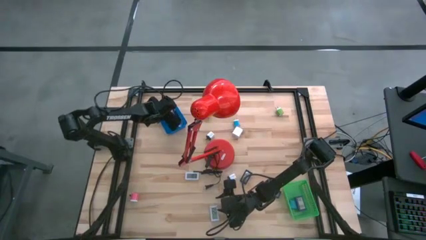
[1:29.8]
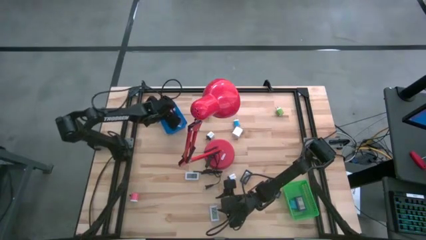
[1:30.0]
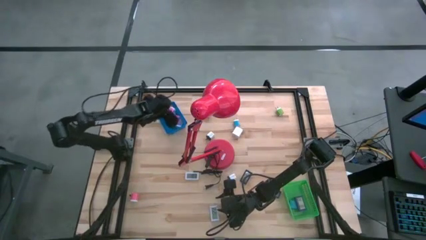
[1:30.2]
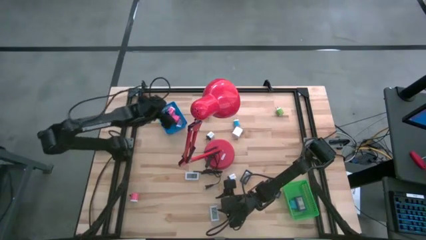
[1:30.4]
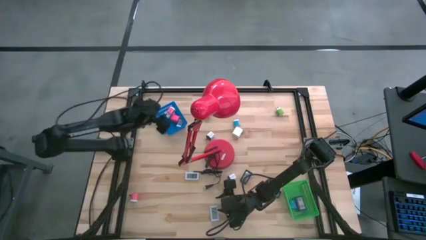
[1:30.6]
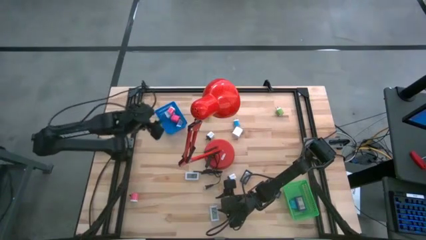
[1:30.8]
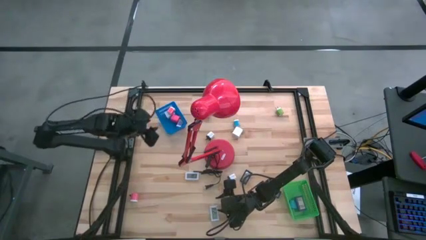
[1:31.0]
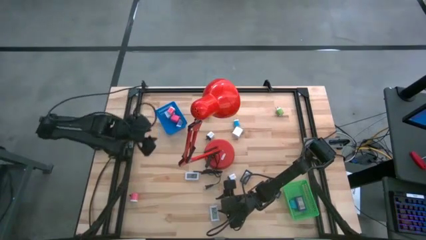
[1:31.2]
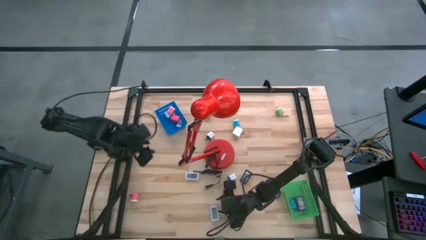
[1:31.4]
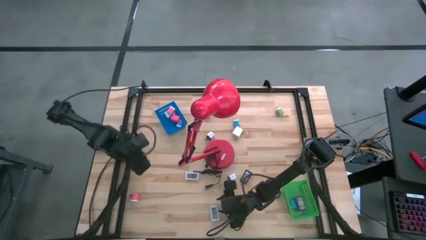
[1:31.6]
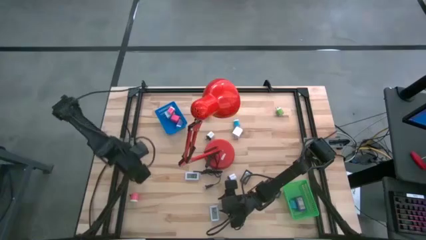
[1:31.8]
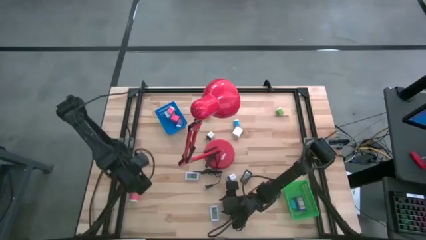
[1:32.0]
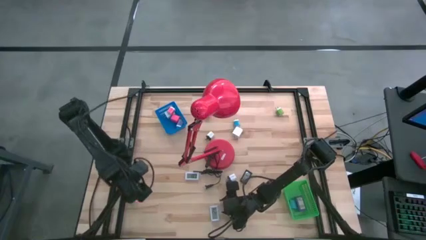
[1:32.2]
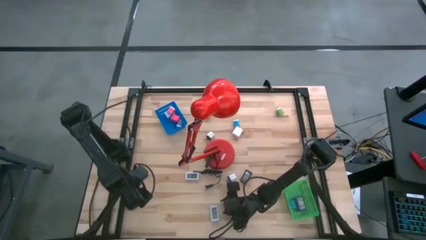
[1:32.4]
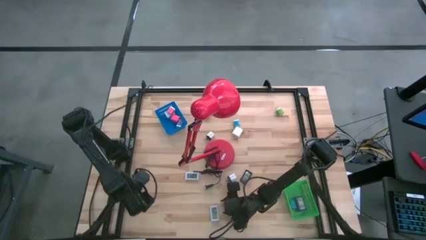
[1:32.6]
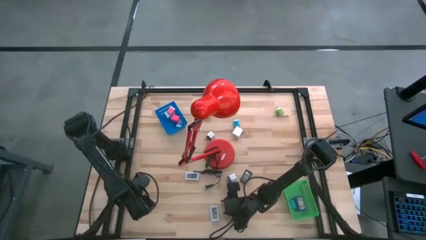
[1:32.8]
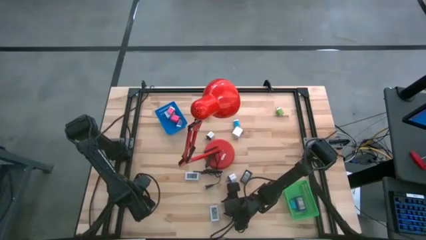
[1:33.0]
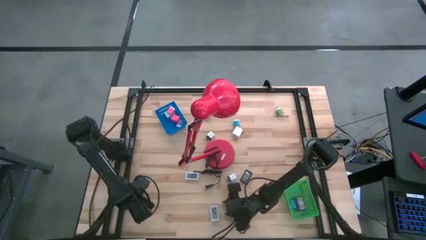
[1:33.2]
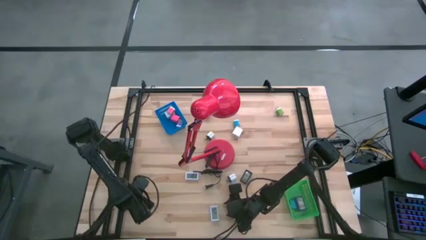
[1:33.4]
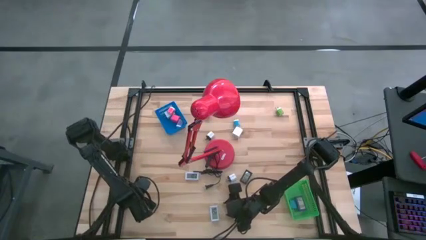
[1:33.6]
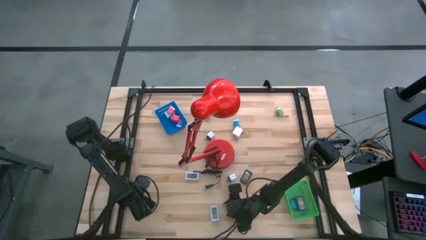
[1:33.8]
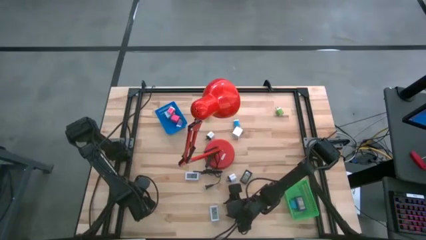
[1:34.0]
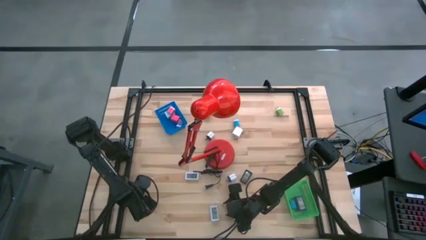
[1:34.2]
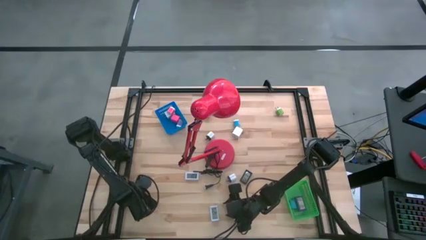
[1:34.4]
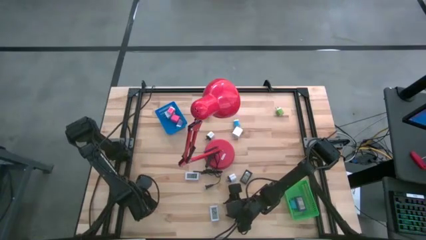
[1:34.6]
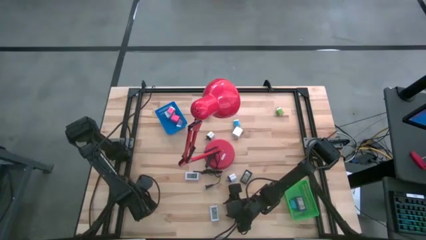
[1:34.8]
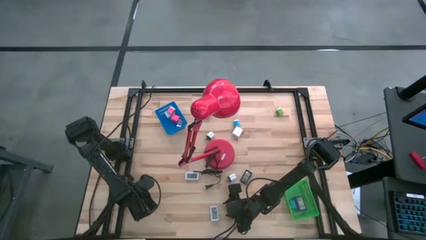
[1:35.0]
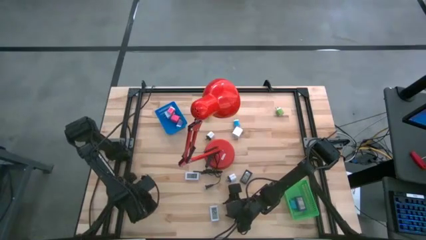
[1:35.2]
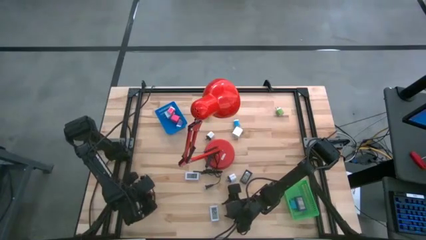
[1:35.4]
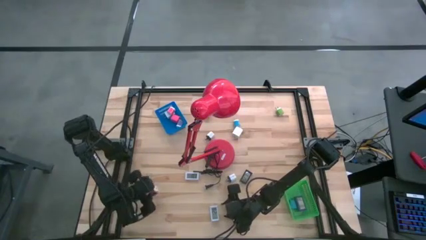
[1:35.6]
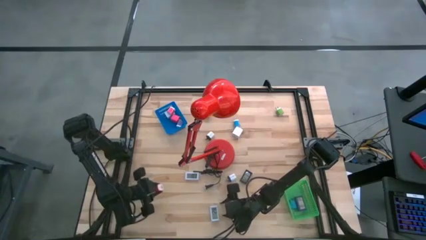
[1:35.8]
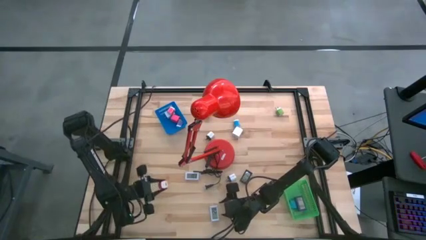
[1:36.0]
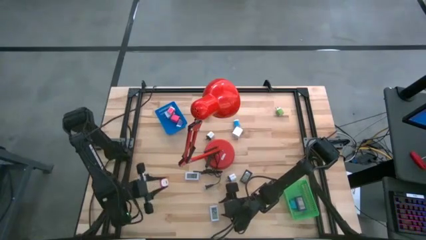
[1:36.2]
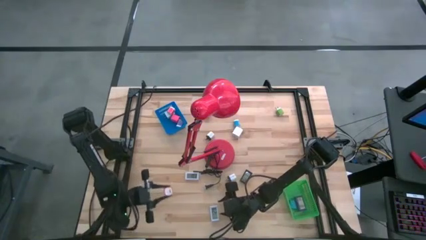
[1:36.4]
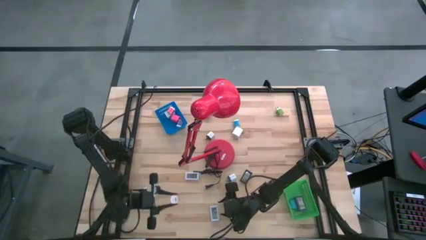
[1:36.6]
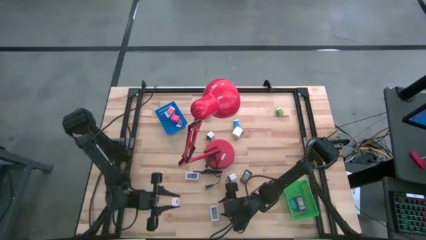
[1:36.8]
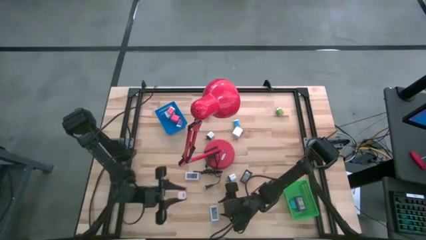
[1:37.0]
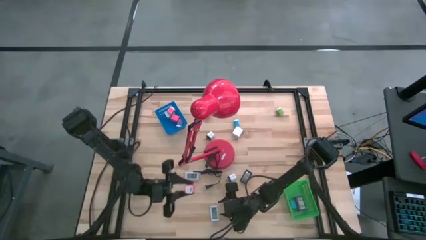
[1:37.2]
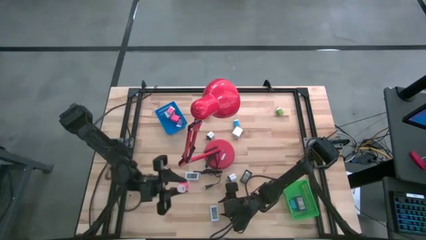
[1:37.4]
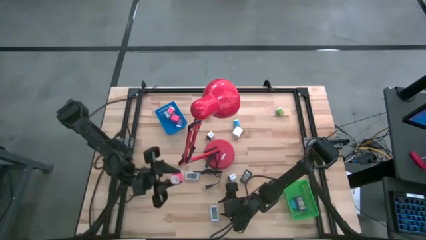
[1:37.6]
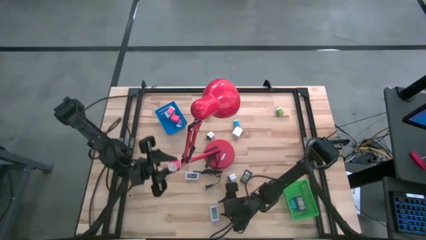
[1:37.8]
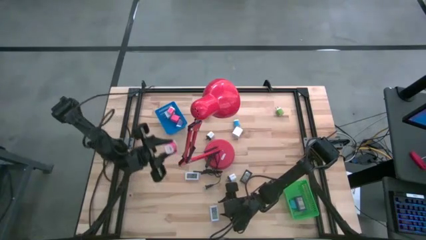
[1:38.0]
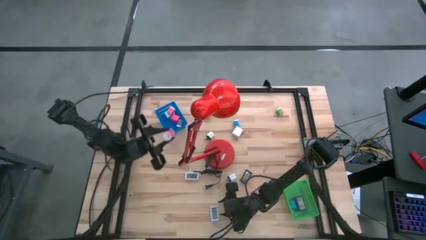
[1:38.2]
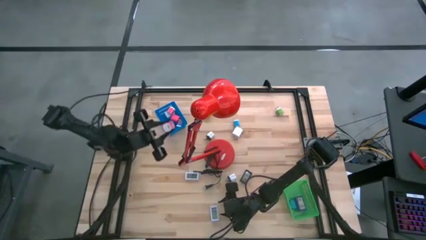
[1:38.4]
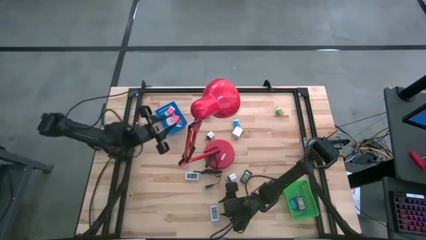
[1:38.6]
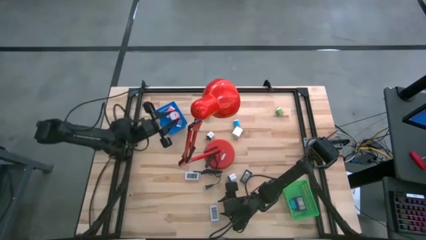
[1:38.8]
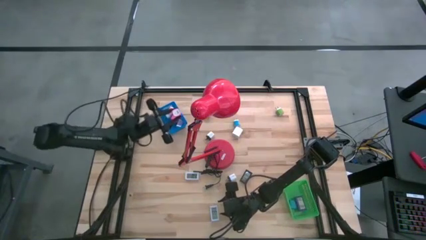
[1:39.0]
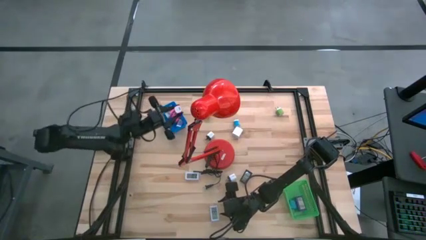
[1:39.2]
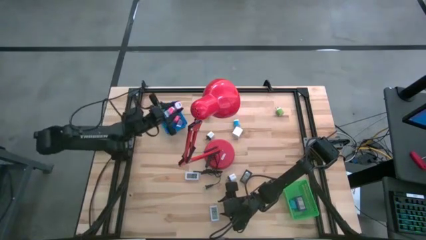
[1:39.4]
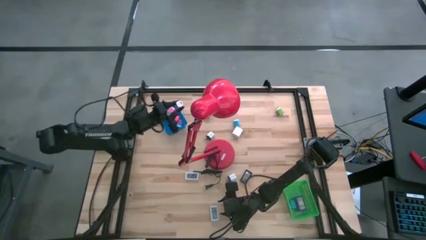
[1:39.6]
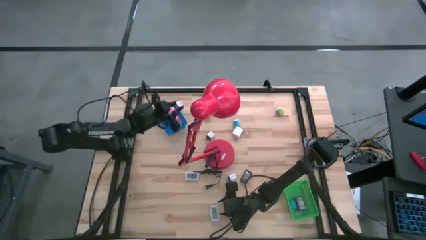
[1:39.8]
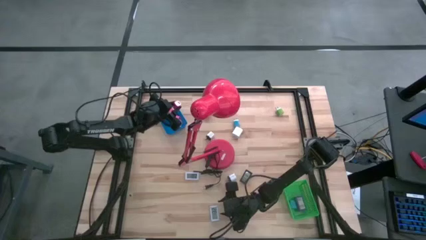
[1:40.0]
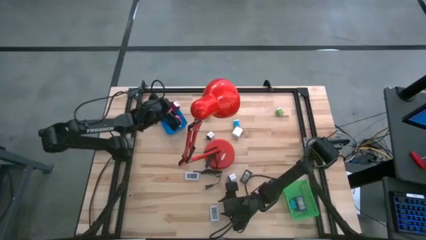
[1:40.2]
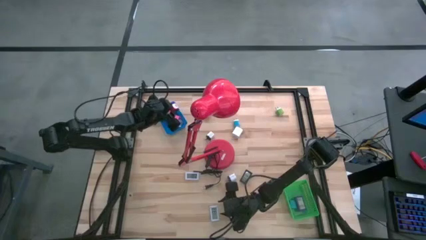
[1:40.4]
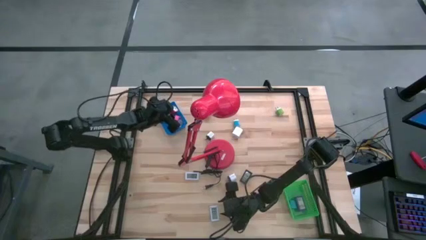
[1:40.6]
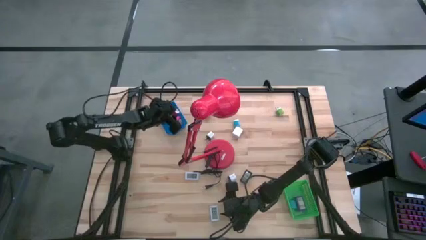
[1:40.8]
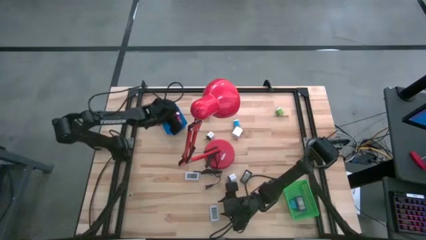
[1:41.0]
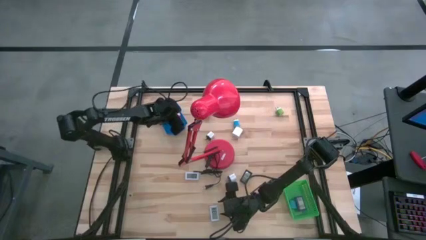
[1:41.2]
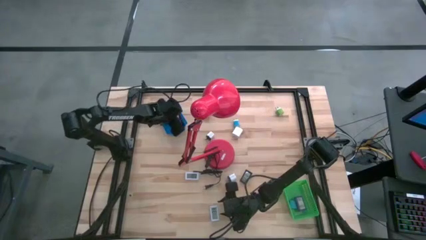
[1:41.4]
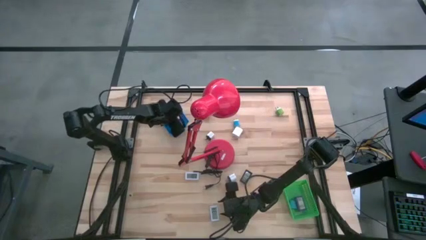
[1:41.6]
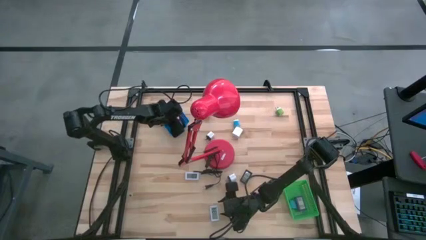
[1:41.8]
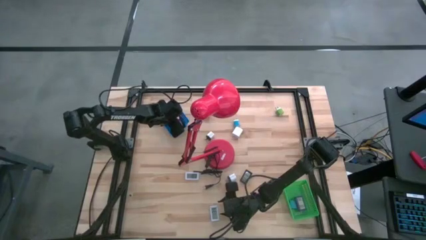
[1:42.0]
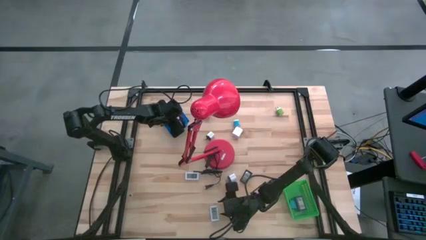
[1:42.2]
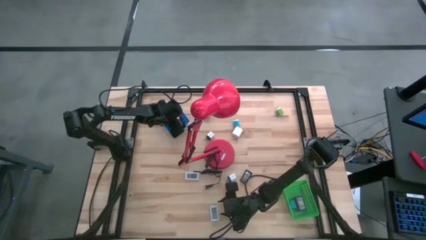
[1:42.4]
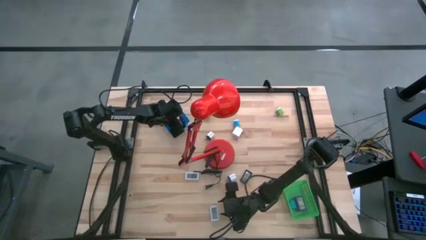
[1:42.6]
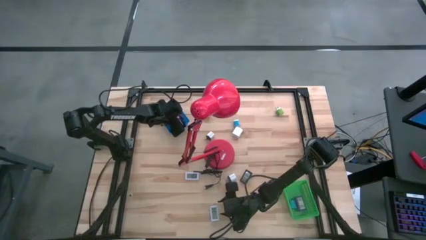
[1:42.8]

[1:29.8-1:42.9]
Task: Pick & Place Office items
Put the light pink charger adapter into the blue bin
